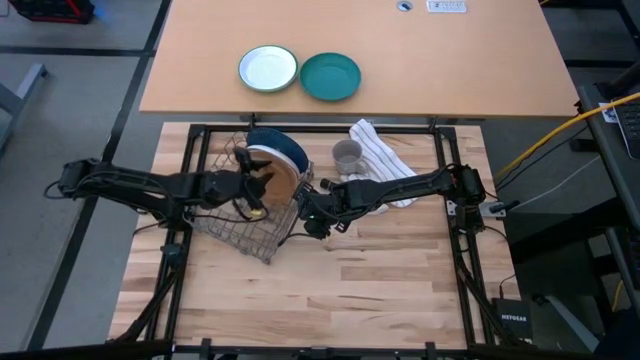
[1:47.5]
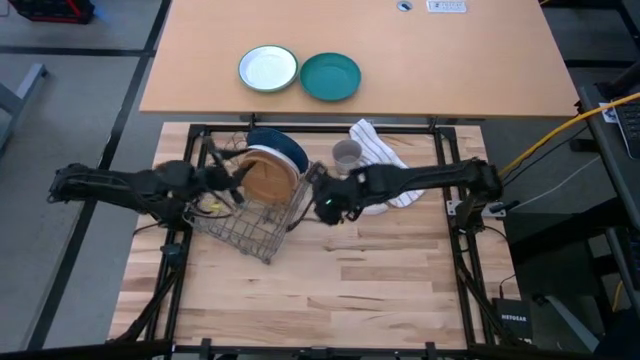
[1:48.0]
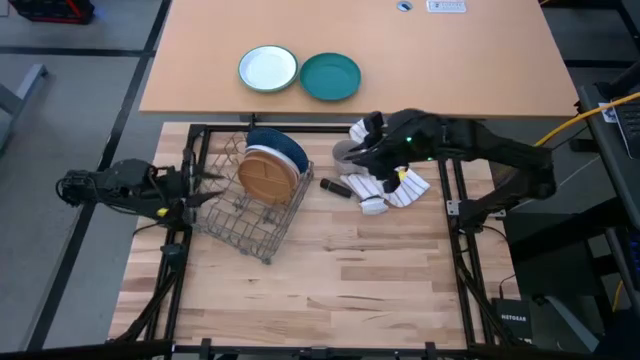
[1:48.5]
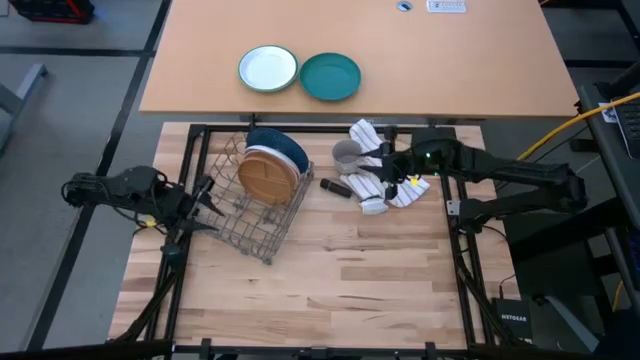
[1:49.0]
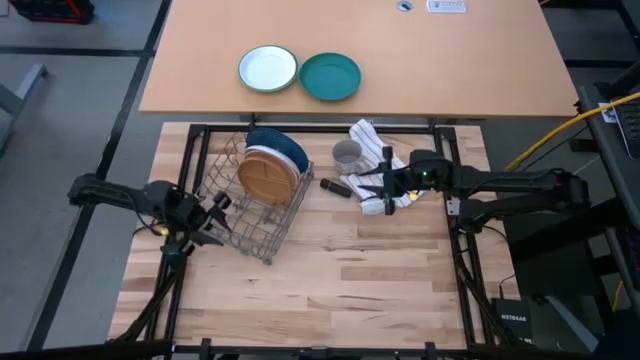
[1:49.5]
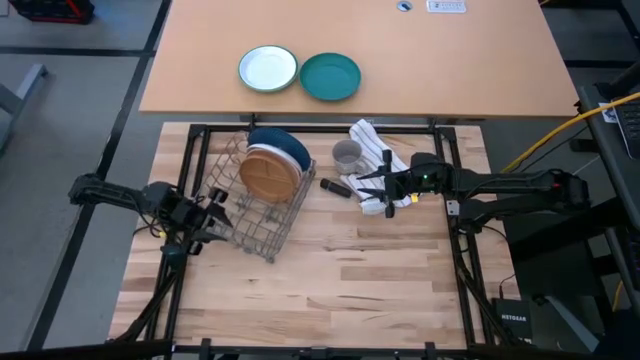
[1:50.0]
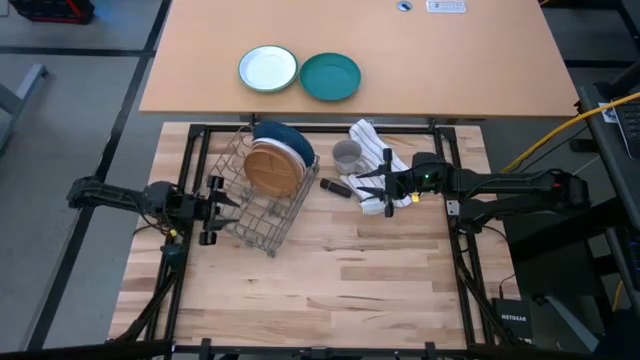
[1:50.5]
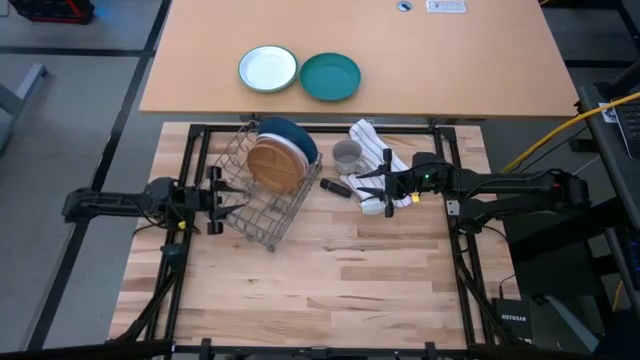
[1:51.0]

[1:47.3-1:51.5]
Task: Sort dishes
Adjust the dish rack

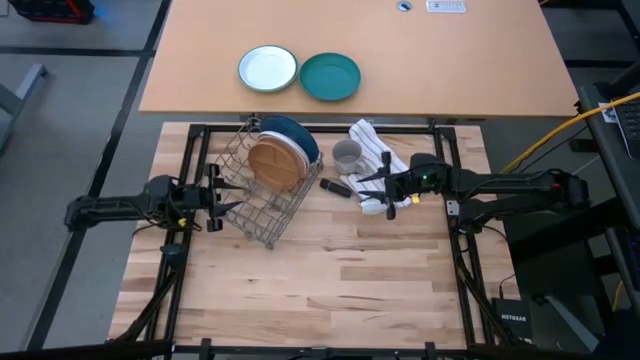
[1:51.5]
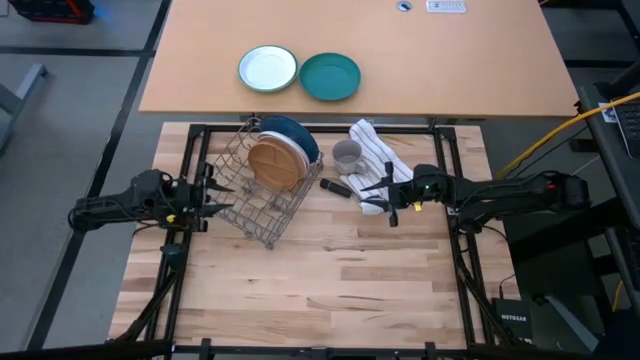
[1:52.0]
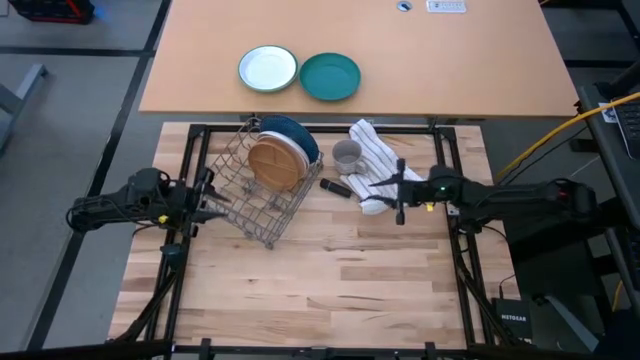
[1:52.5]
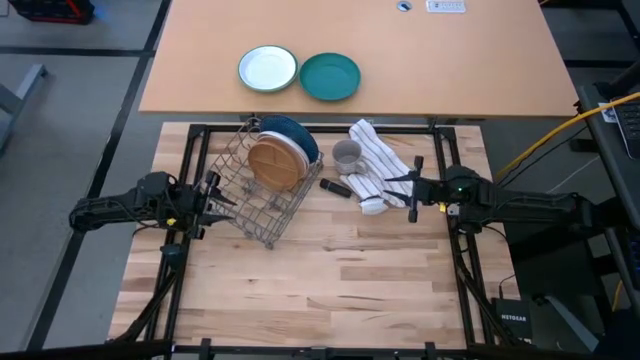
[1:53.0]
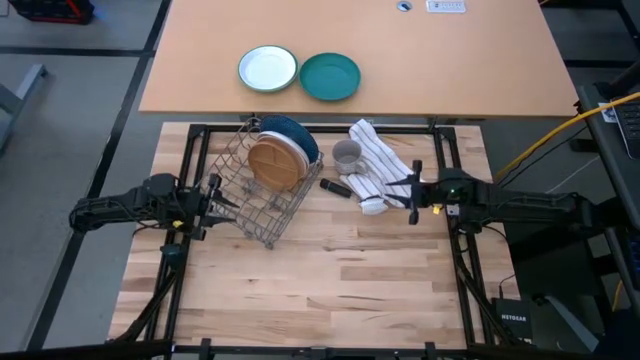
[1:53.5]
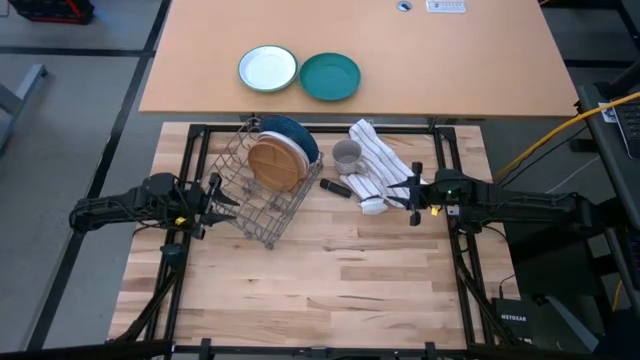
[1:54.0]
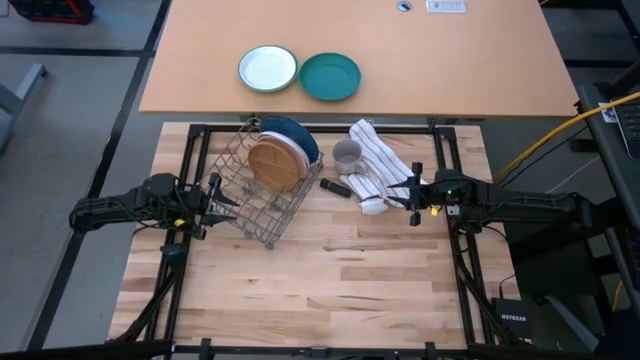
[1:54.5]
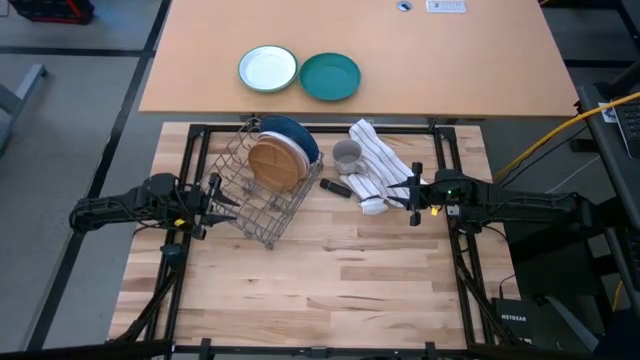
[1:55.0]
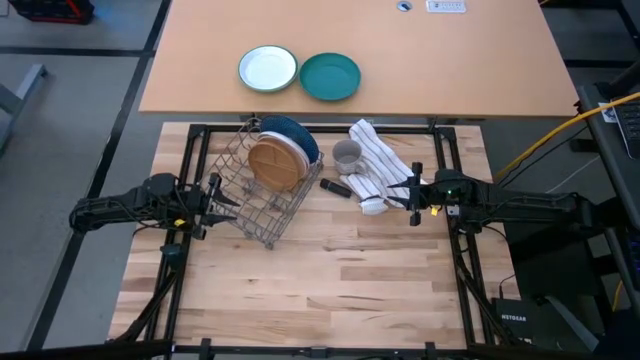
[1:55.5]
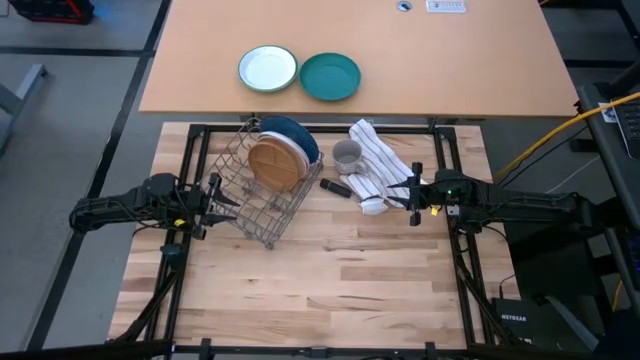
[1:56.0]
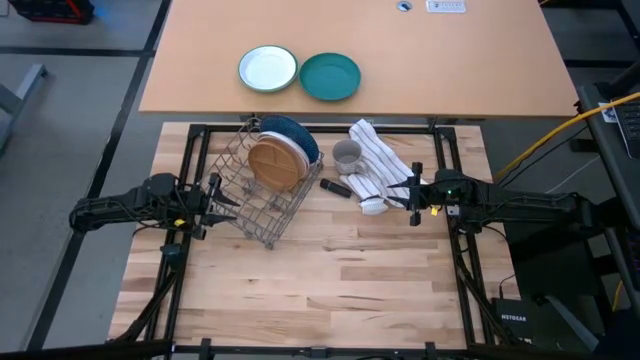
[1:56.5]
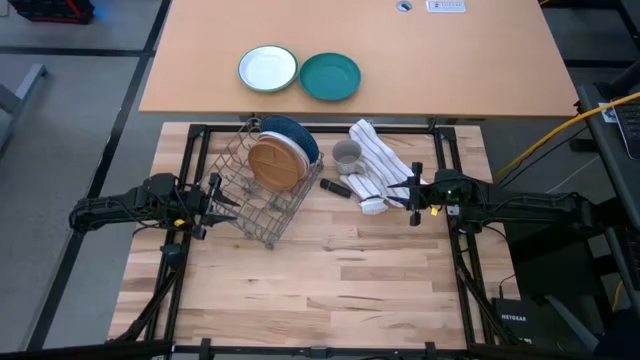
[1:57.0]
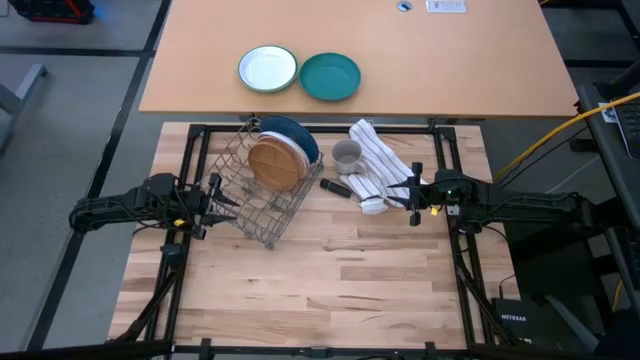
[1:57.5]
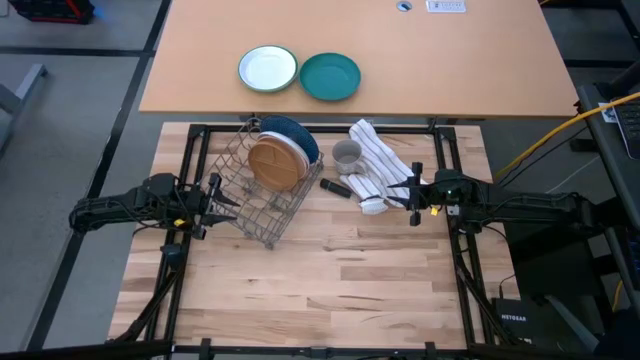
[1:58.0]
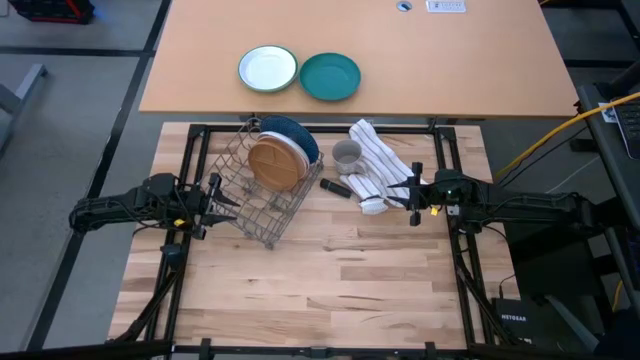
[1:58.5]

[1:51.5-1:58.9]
Return to Home Position

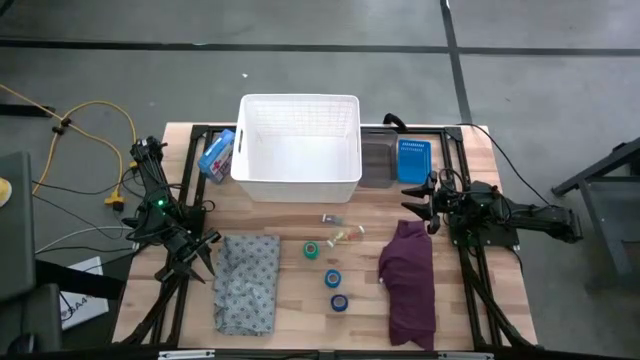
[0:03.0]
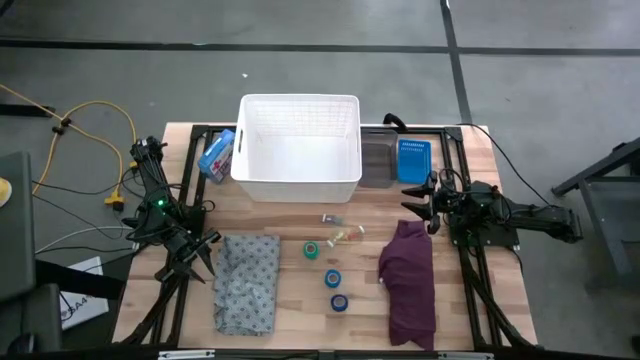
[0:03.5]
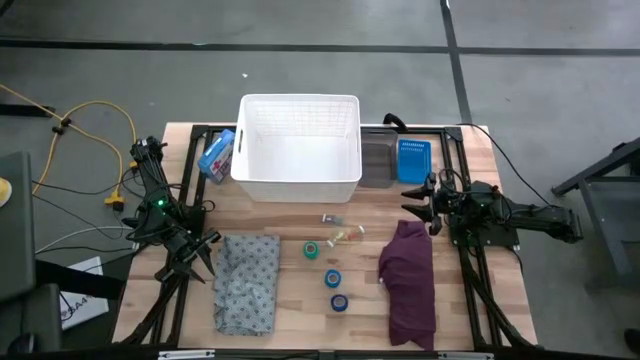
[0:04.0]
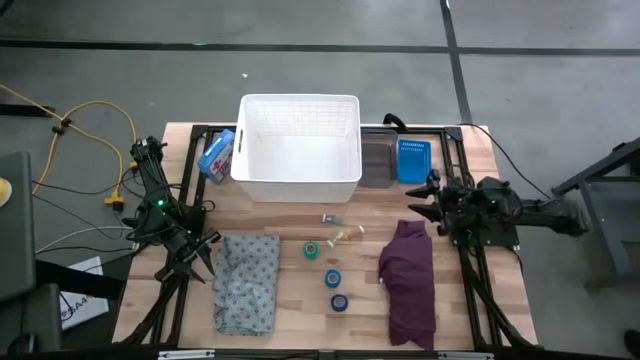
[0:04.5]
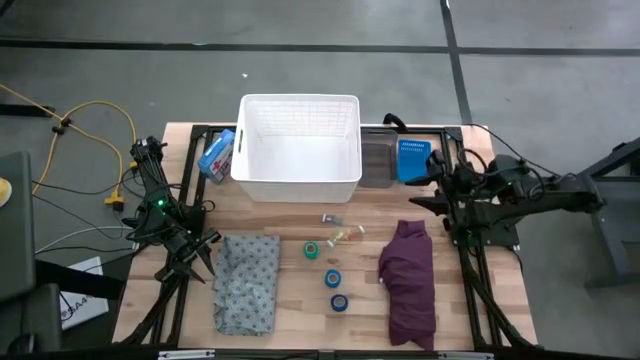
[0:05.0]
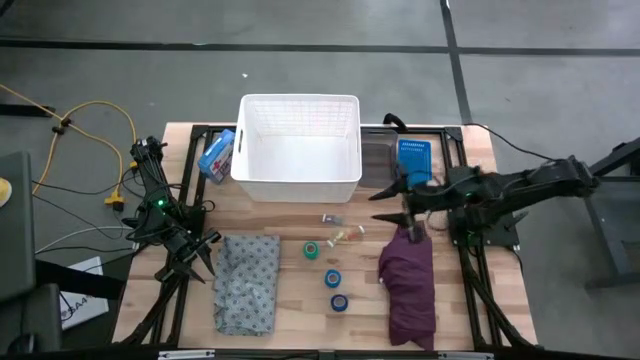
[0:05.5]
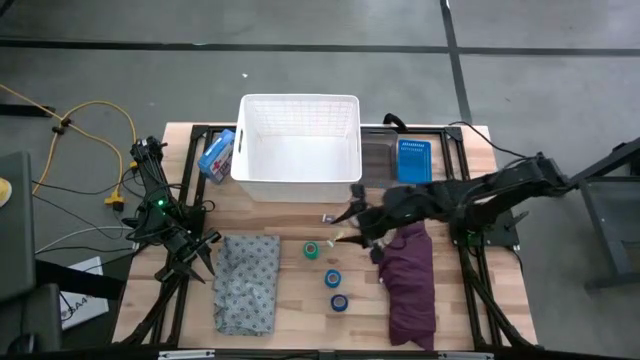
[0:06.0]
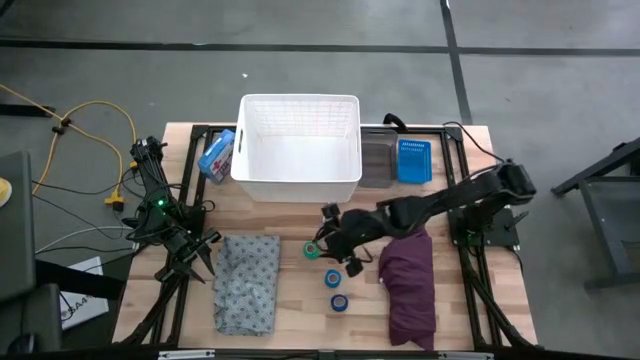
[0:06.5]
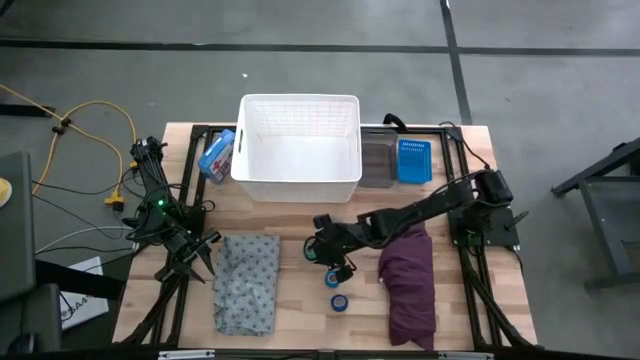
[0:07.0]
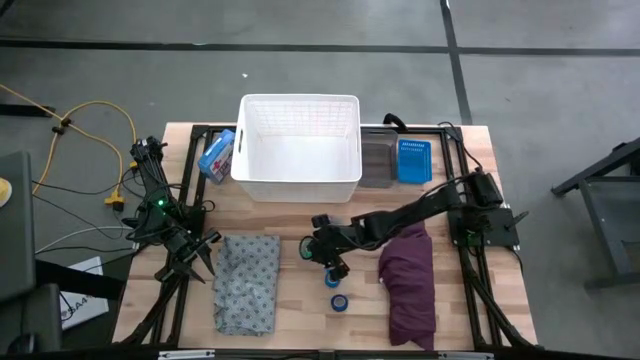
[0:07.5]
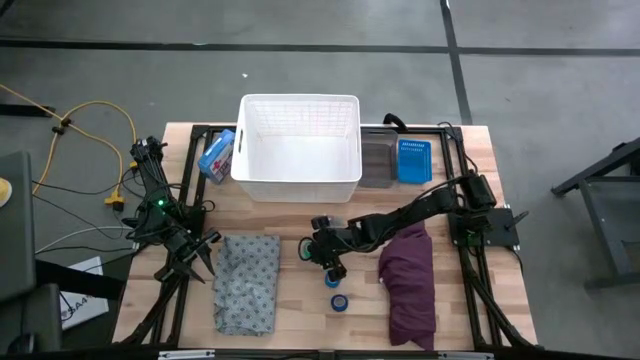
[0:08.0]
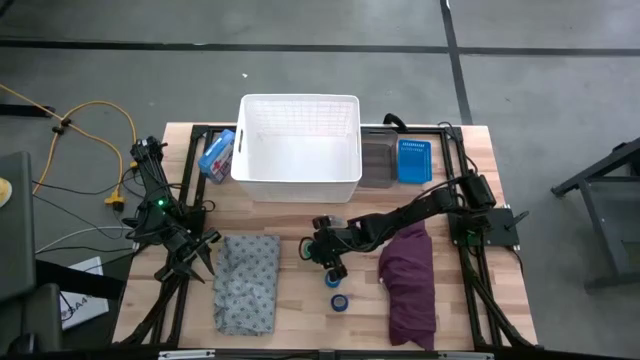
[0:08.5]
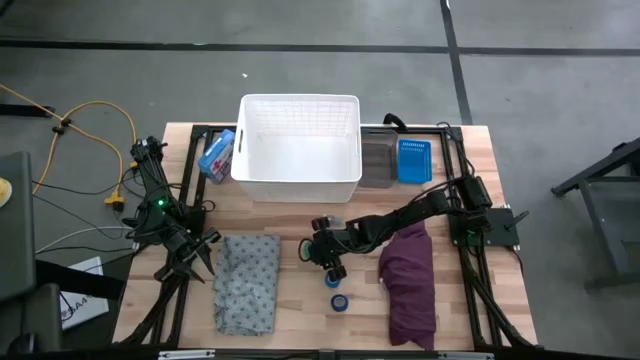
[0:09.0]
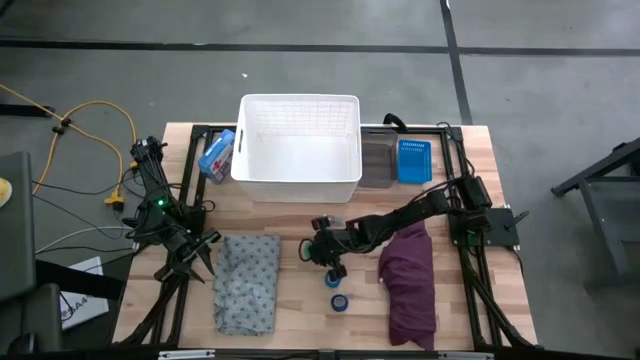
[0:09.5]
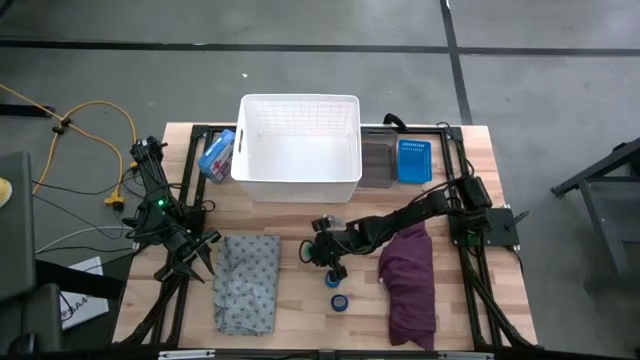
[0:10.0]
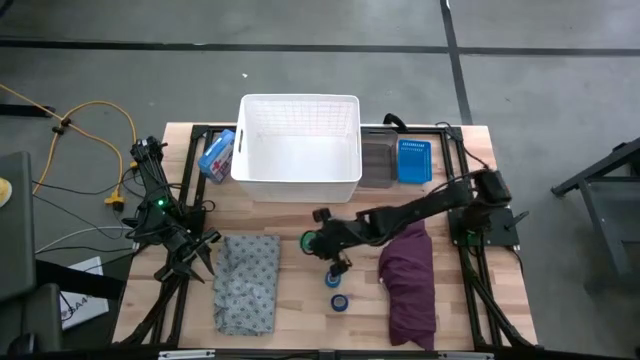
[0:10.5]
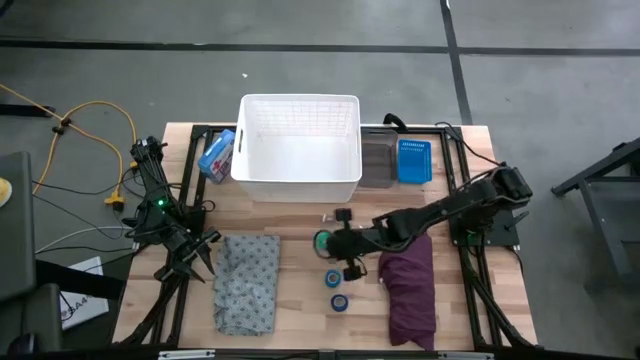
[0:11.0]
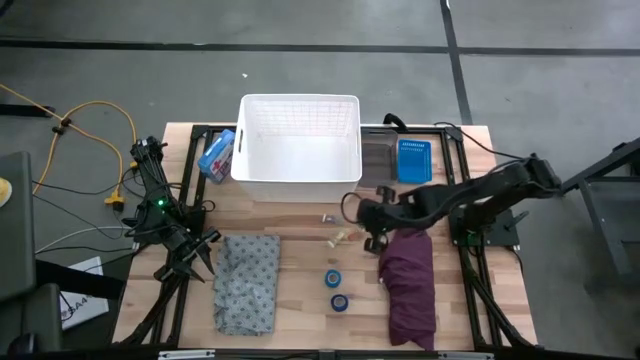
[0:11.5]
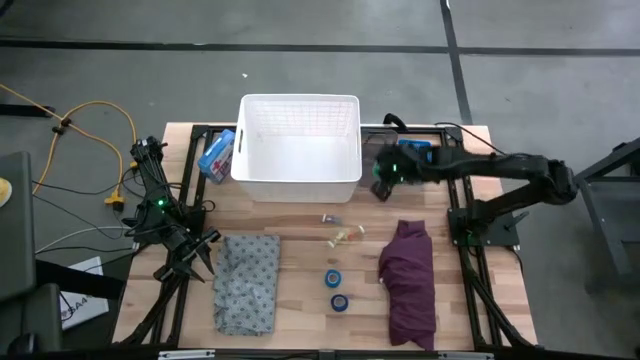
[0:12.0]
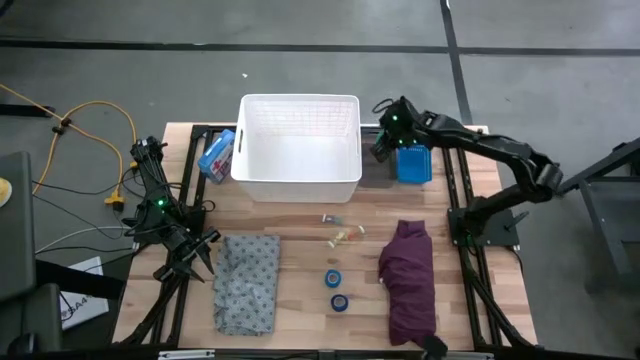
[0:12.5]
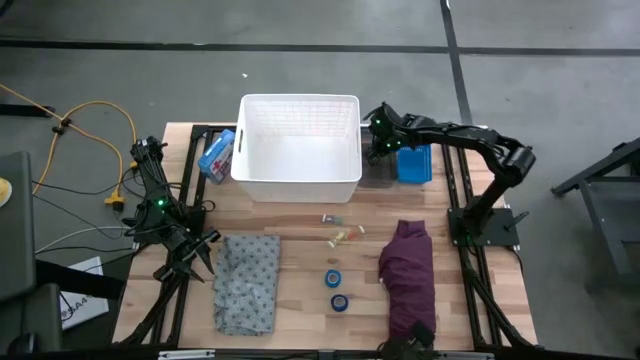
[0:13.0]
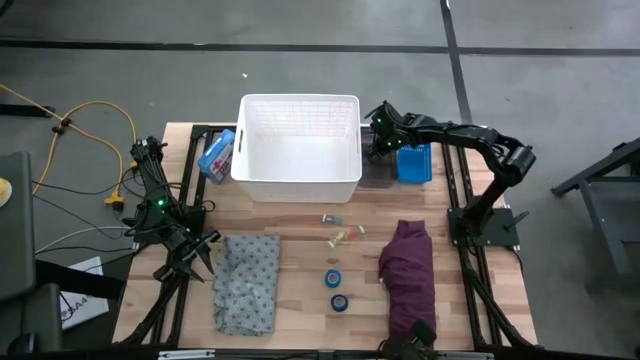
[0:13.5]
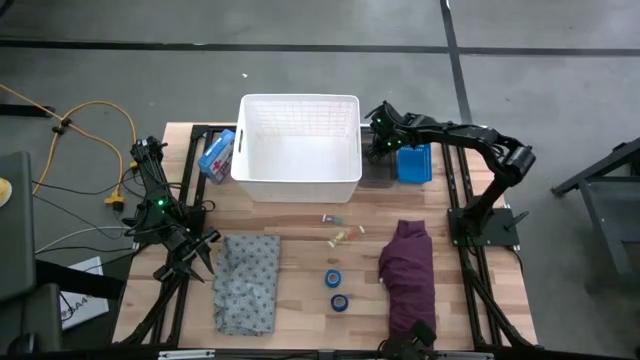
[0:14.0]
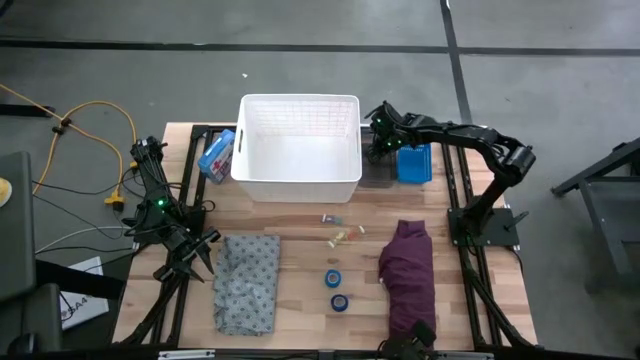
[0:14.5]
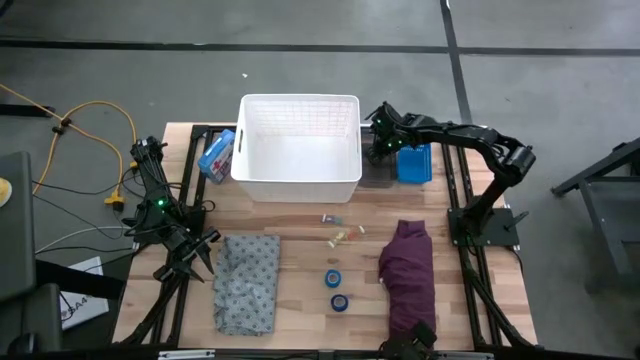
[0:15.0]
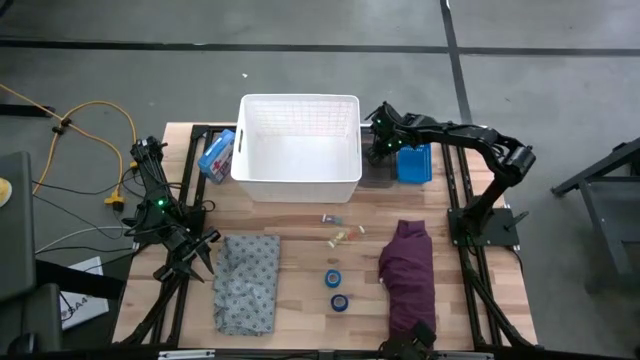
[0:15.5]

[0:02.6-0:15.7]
Task: Pick & Place Medicine items
Put the green bandage into the black bin
